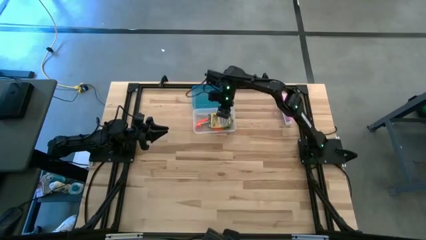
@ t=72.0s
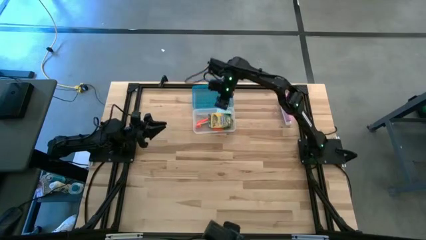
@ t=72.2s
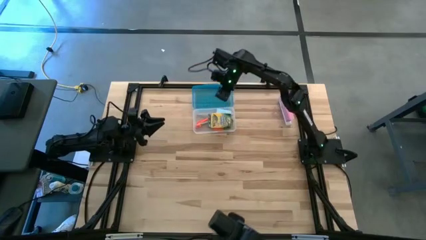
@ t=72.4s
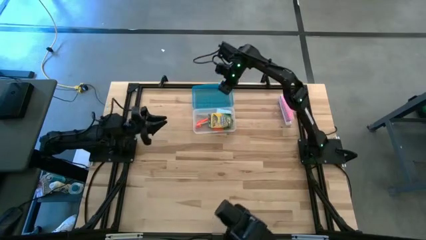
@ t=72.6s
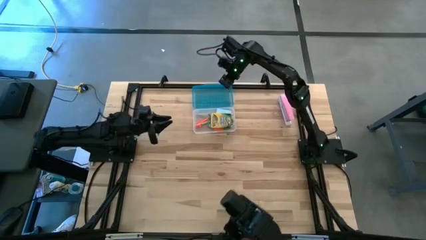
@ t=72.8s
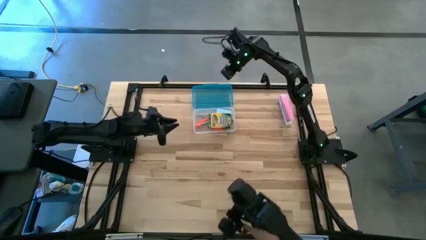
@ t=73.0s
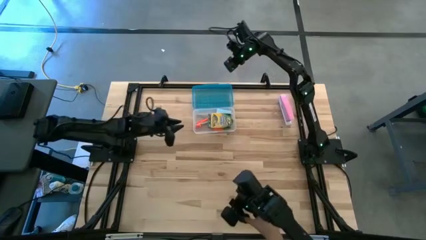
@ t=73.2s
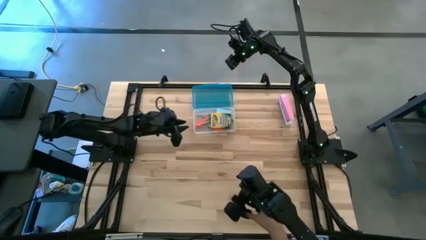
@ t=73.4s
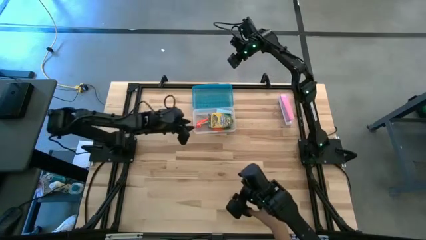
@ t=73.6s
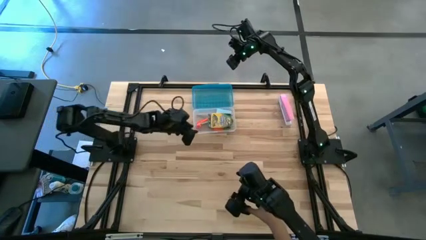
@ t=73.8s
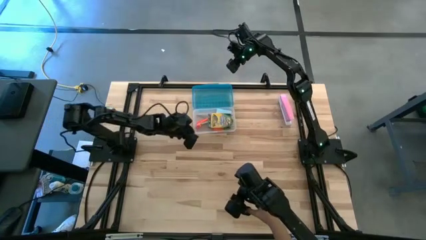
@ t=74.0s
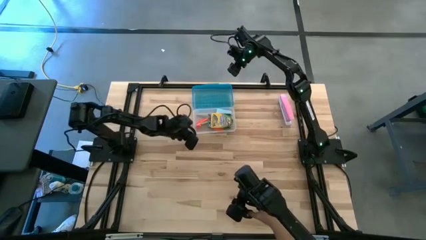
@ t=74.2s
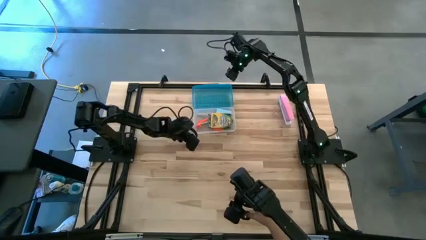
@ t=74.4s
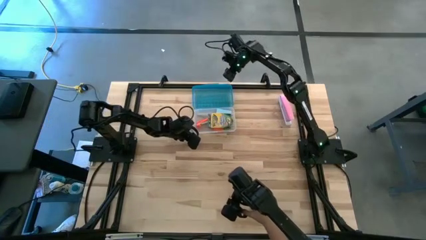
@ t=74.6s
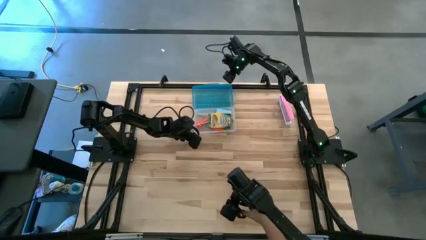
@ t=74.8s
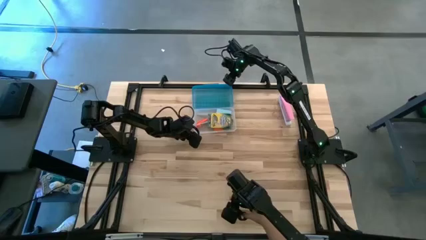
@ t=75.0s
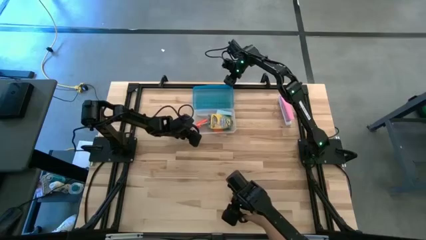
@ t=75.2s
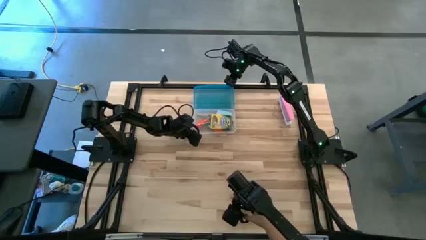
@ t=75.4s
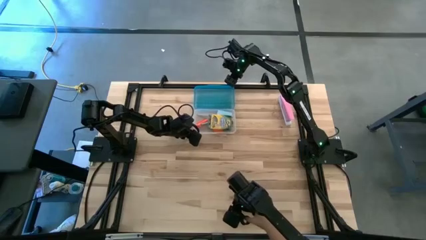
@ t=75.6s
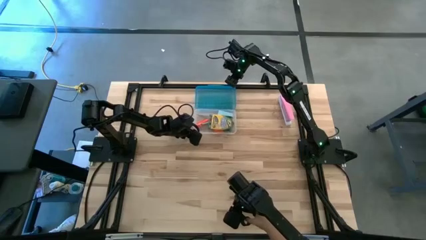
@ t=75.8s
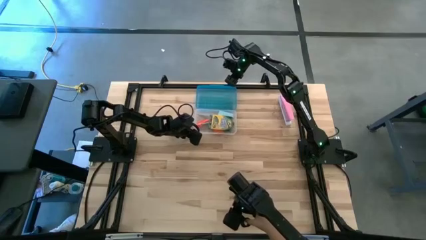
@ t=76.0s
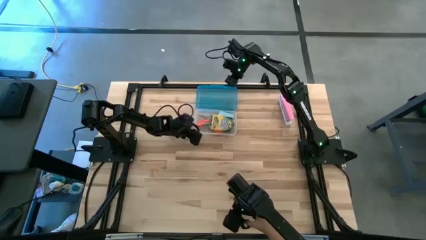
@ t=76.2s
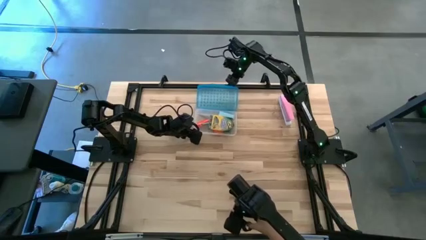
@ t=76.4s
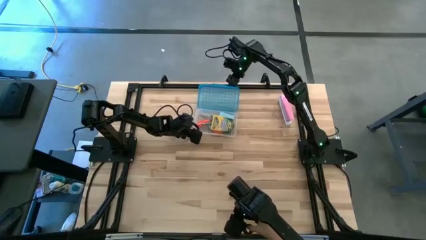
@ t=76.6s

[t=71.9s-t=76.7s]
Task: Pack school essentials
Close the blue supply box

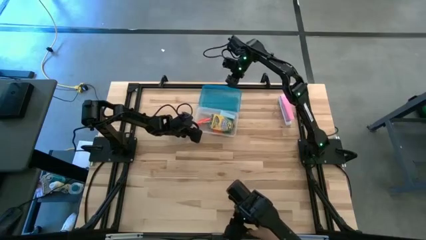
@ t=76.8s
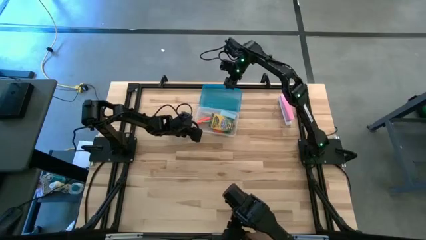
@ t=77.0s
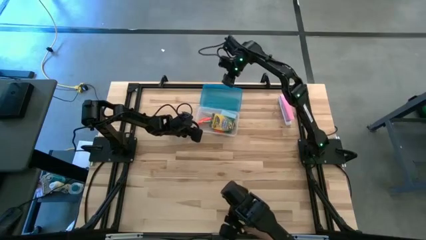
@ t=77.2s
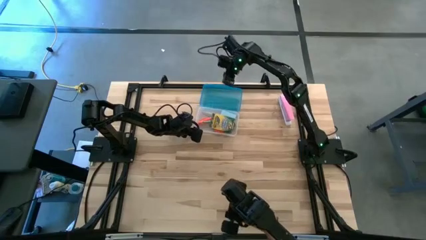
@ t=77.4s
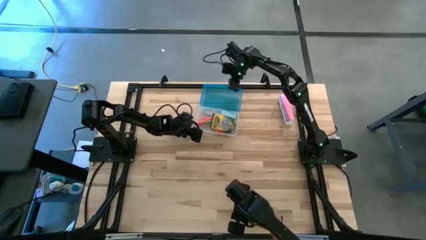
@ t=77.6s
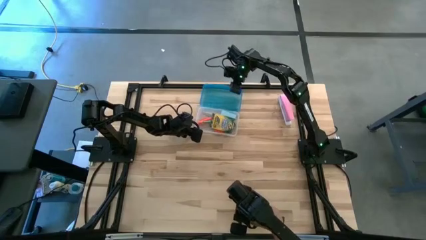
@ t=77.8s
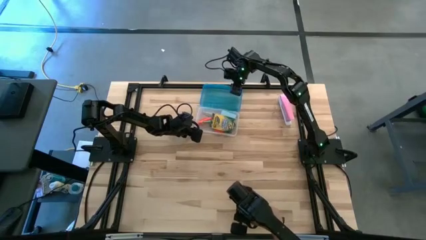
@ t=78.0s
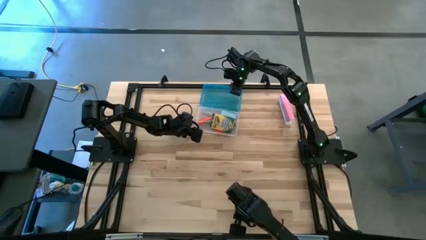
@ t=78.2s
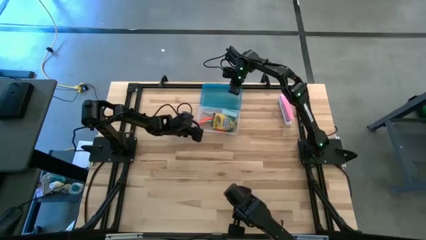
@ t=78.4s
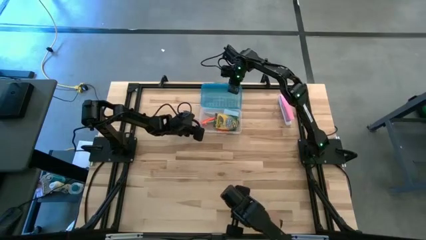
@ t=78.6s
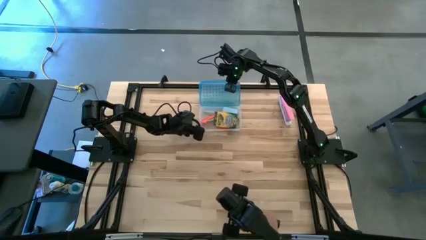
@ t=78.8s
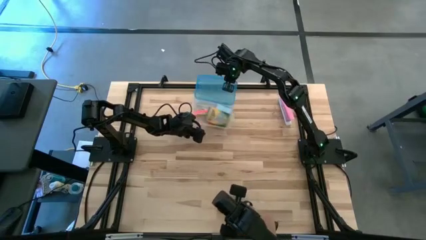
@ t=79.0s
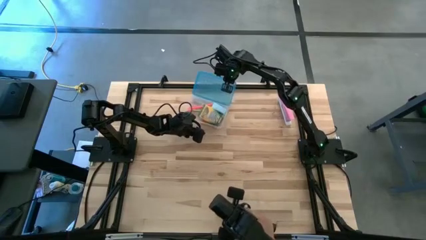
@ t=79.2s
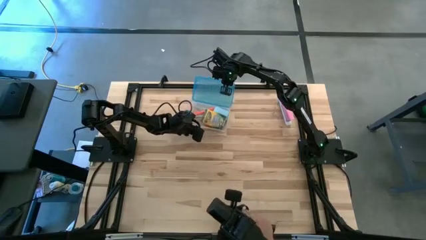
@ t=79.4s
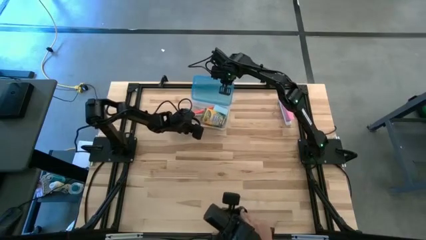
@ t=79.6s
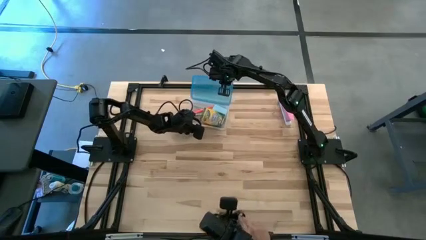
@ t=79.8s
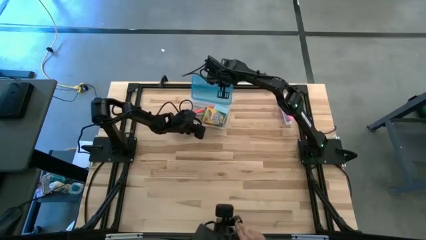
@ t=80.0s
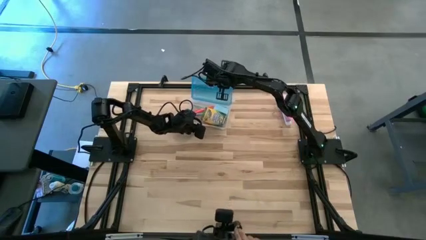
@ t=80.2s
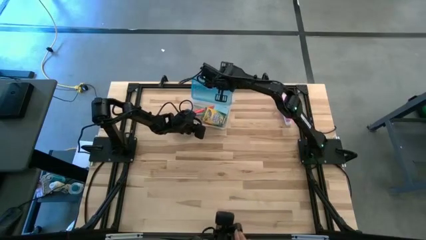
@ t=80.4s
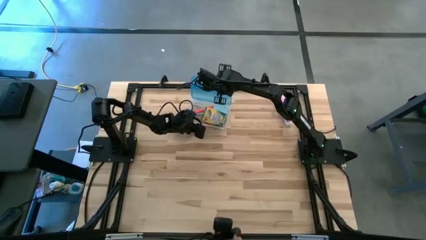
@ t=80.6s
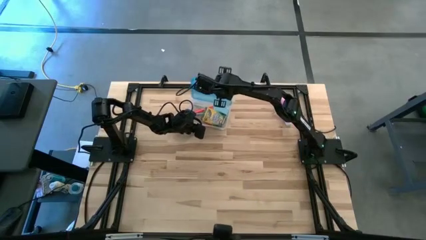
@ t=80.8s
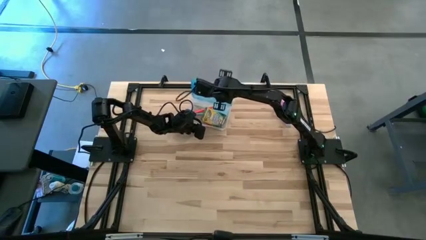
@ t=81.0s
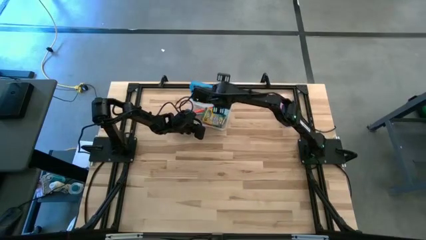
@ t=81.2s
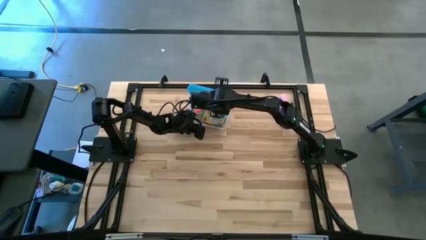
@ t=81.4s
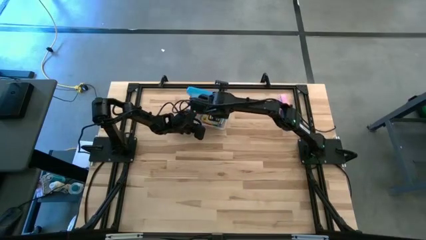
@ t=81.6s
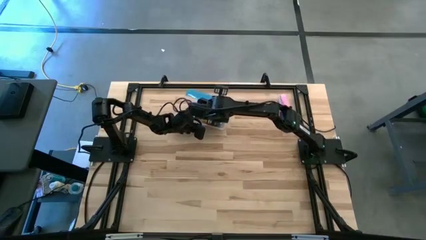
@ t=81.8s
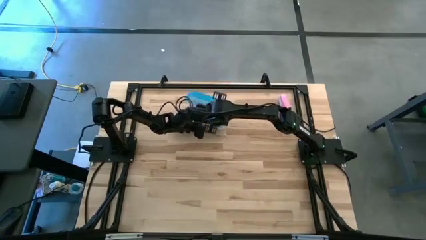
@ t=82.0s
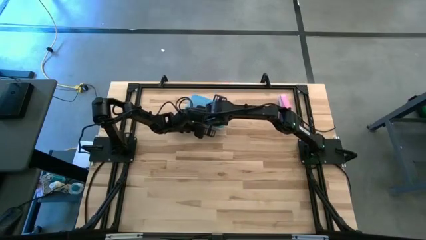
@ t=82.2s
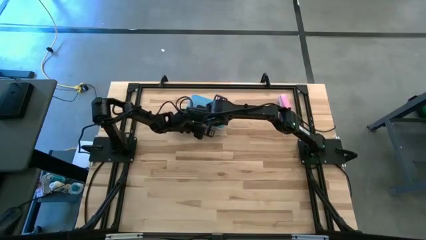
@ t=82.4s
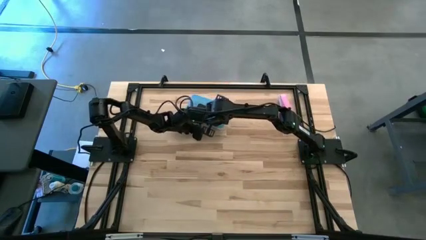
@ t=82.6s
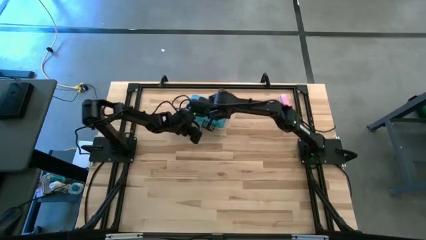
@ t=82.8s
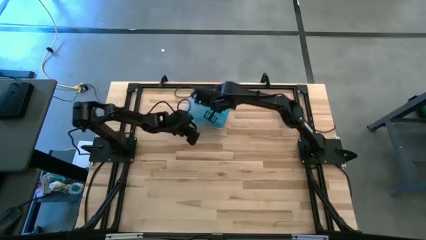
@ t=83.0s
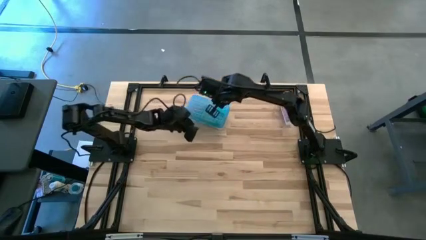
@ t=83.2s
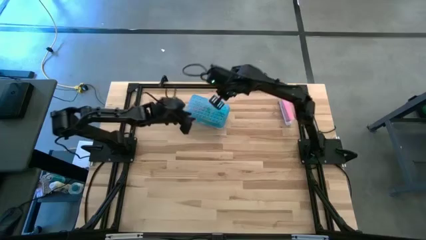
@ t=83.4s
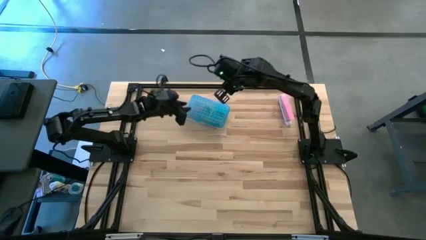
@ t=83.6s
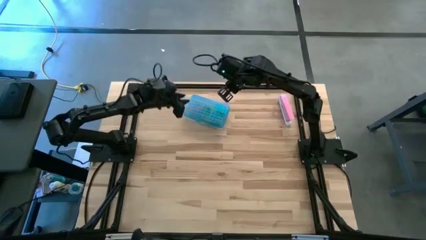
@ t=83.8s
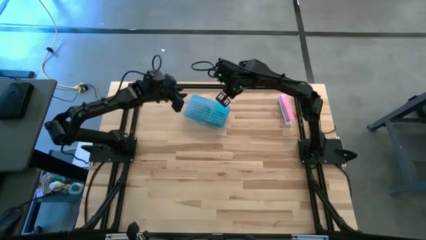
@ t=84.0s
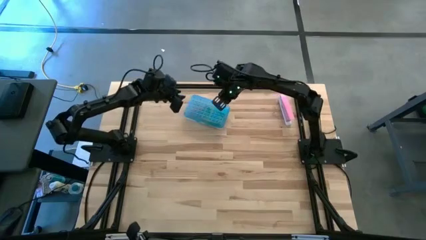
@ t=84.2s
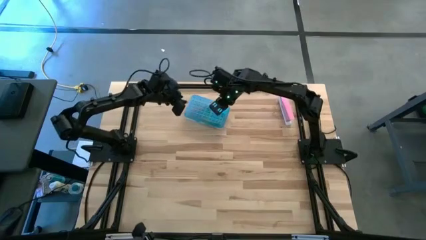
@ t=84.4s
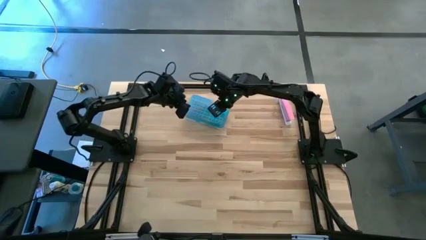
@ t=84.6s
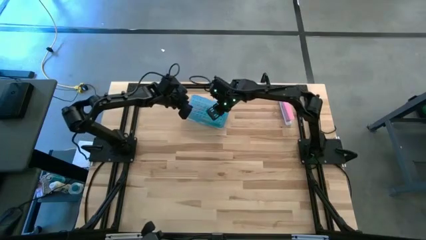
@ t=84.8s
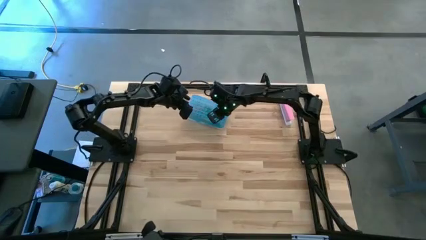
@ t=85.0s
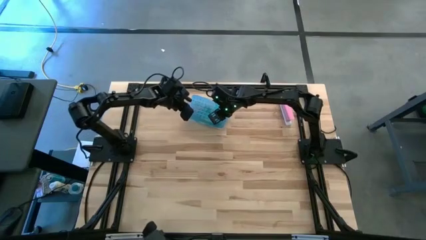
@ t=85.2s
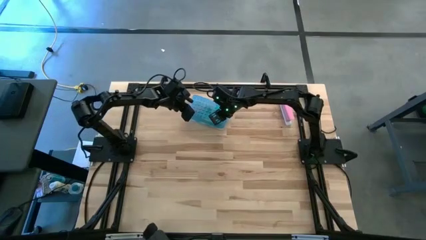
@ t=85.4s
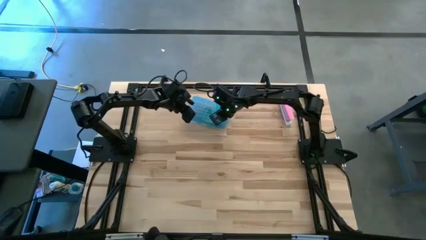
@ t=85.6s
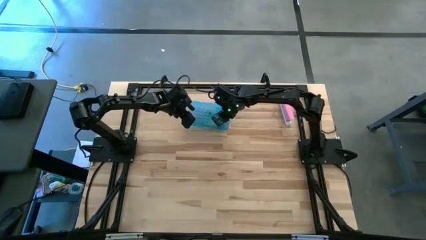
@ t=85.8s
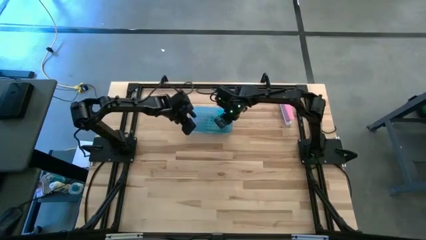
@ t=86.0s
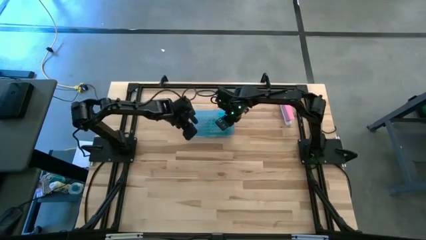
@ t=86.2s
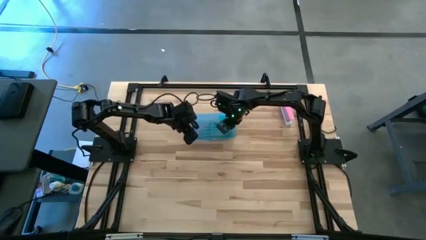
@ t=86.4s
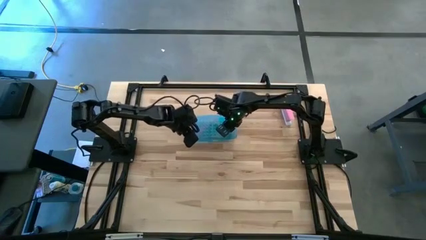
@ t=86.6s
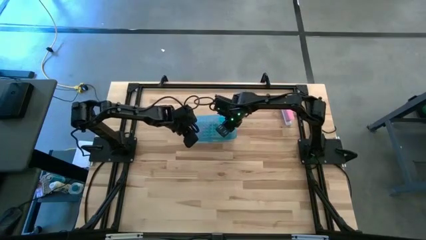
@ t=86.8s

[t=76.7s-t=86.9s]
Close the blue supply box

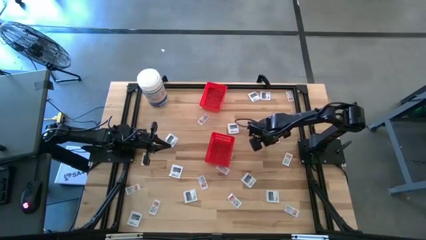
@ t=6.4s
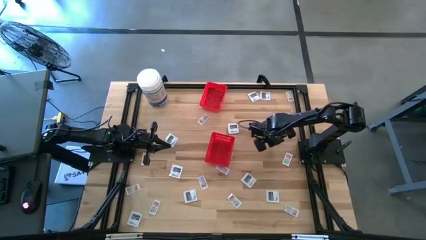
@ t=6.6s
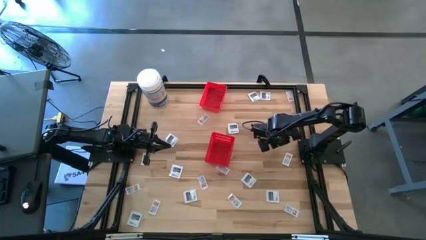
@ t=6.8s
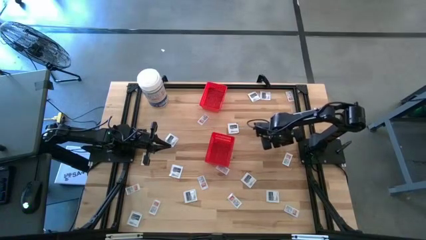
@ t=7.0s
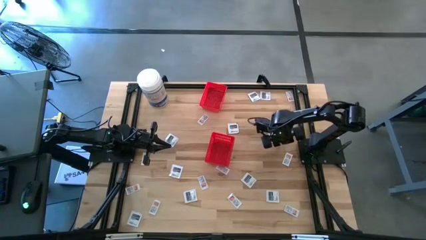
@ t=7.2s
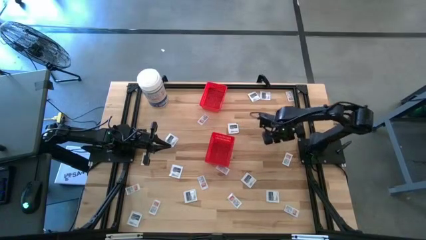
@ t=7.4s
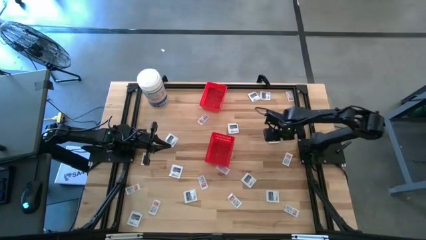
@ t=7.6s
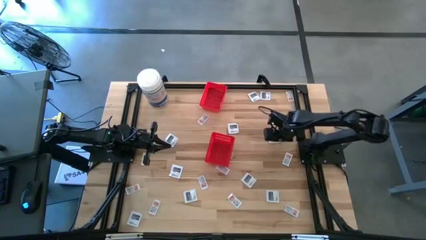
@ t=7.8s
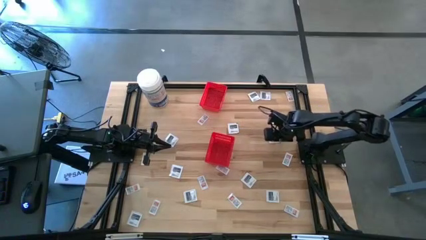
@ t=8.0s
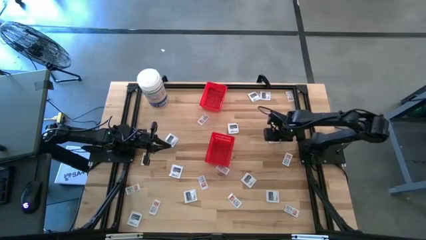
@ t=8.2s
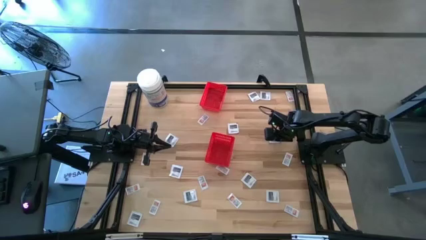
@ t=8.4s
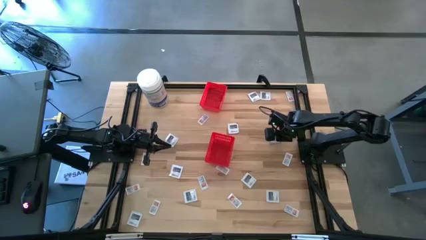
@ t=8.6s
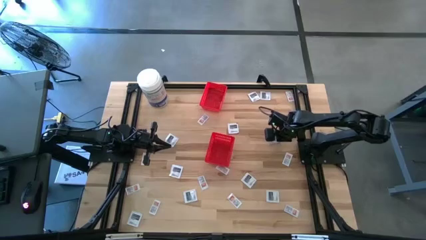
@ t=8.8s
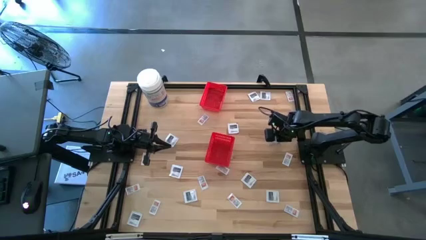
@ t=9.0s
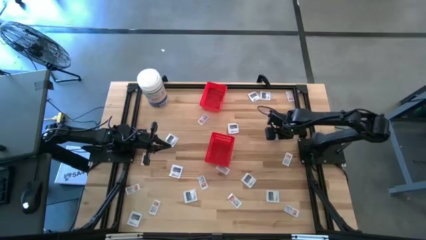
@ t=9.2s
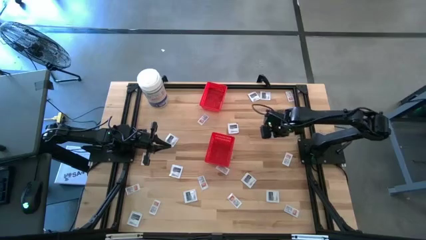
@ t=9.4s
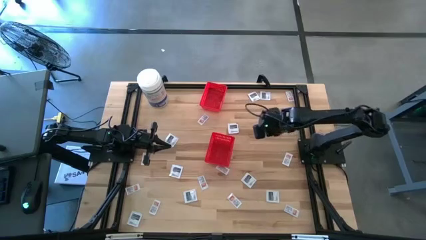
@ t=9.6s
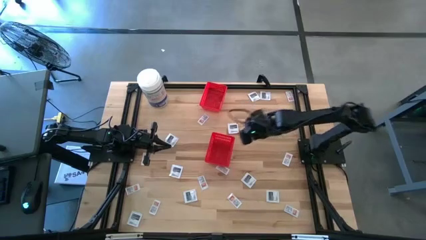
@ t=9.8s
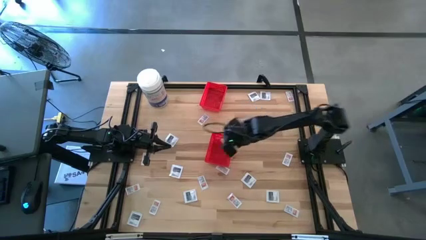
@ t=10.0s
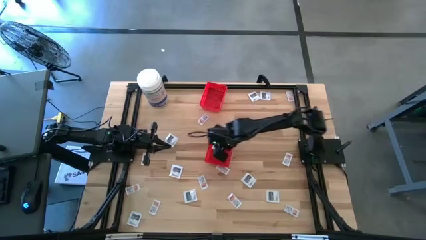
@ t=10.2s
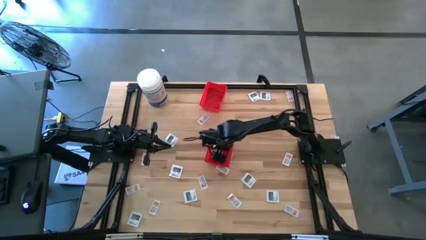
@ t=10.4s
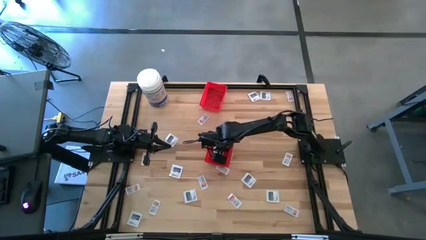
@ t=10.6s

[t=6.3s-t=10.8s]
Task: Pick & Place First Aid Supplies
Put the white towelette pack into the bottom red bin
